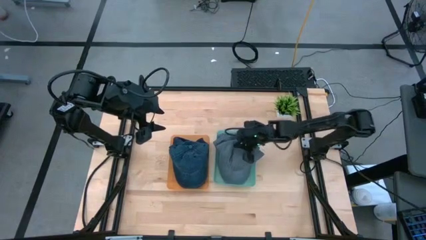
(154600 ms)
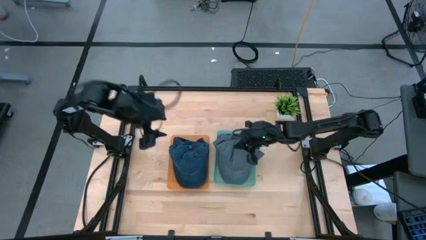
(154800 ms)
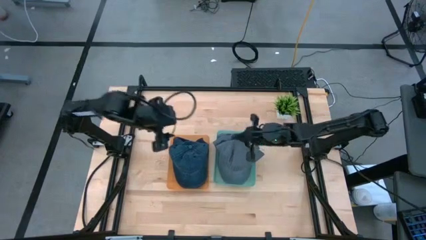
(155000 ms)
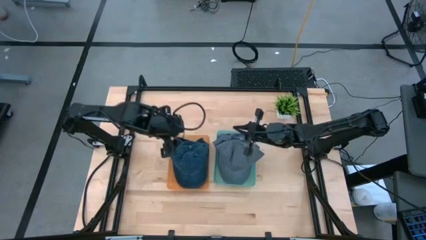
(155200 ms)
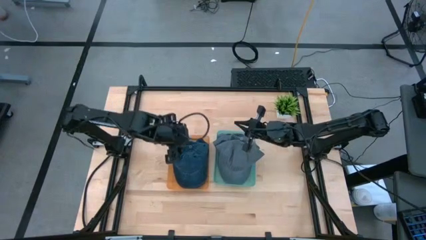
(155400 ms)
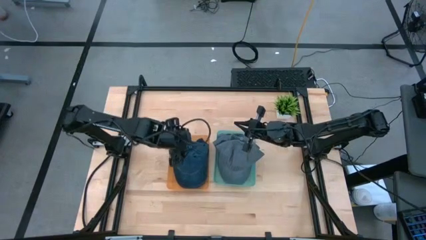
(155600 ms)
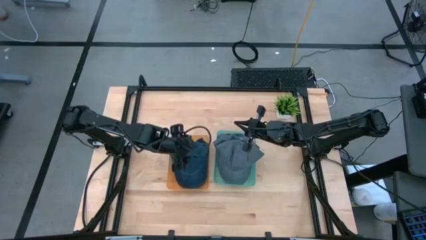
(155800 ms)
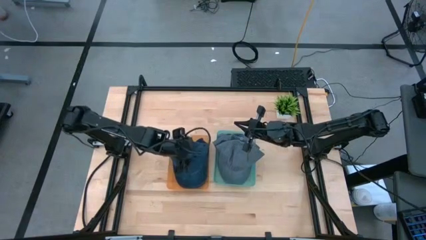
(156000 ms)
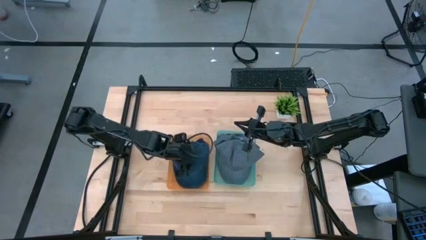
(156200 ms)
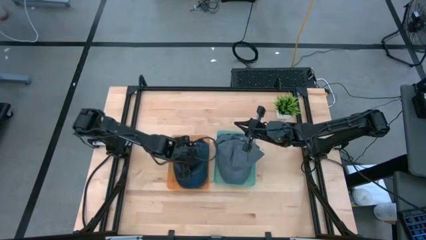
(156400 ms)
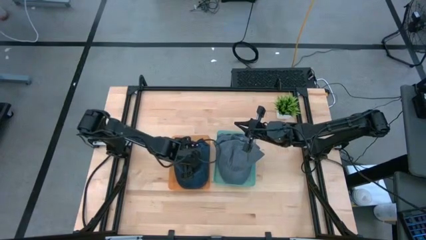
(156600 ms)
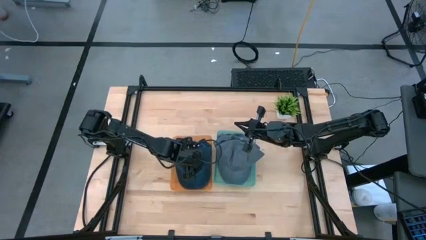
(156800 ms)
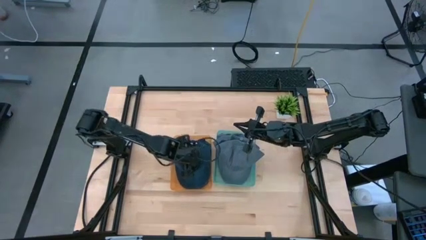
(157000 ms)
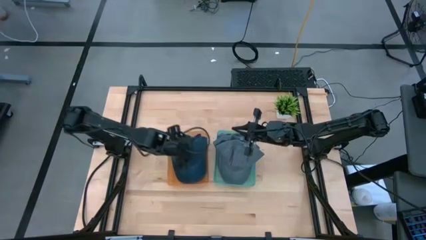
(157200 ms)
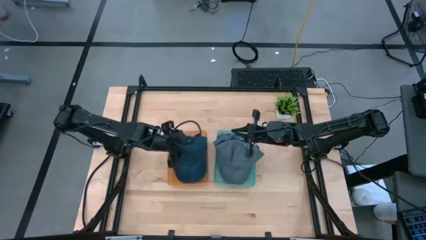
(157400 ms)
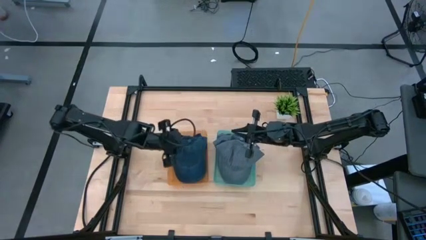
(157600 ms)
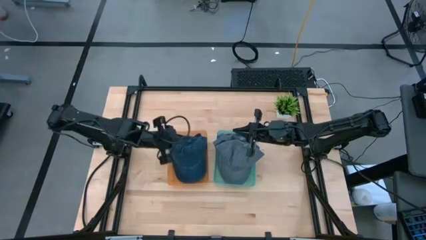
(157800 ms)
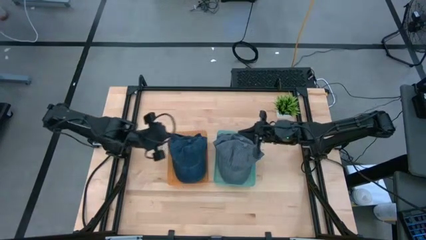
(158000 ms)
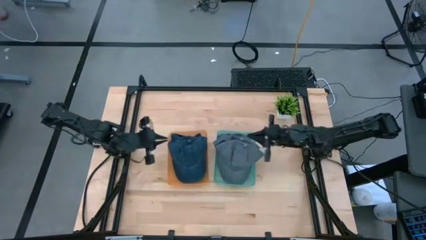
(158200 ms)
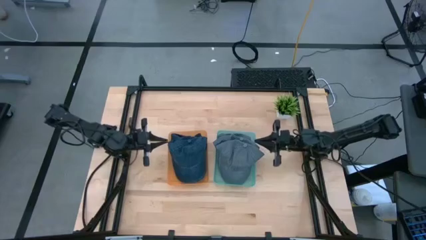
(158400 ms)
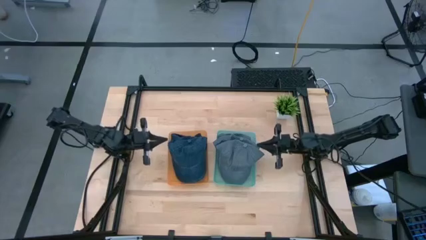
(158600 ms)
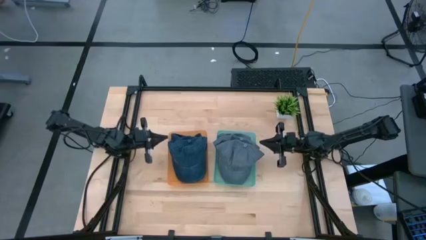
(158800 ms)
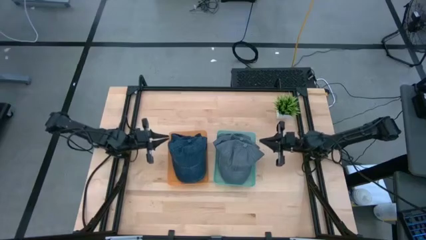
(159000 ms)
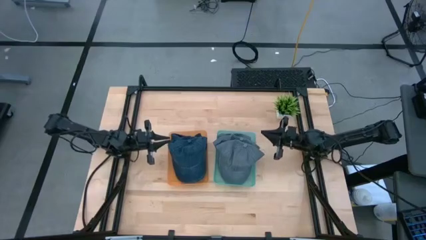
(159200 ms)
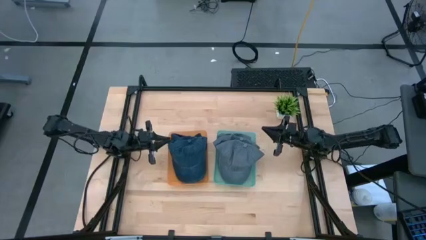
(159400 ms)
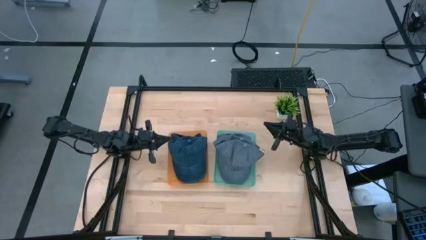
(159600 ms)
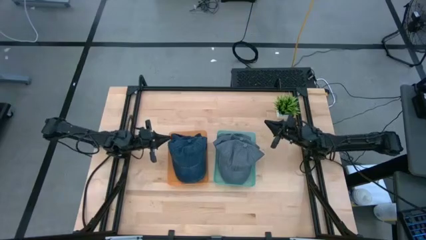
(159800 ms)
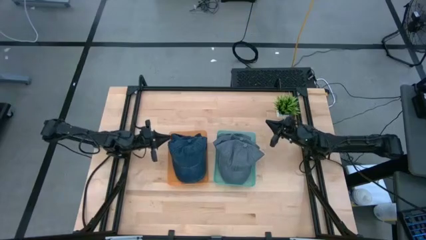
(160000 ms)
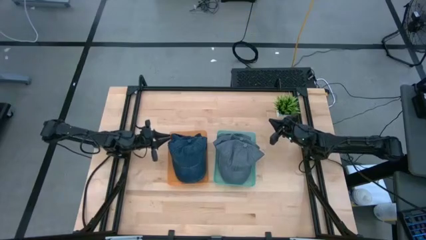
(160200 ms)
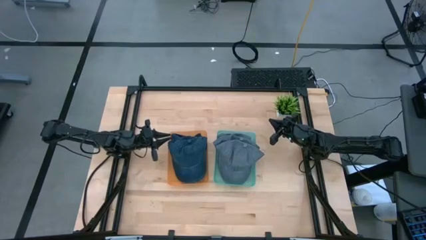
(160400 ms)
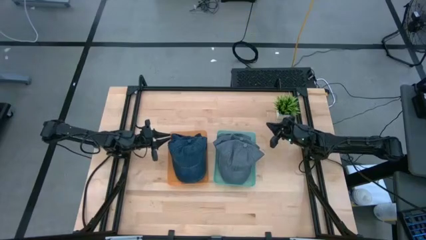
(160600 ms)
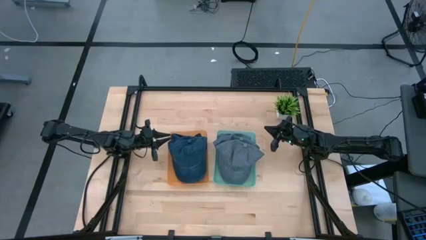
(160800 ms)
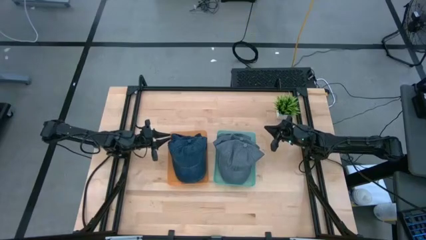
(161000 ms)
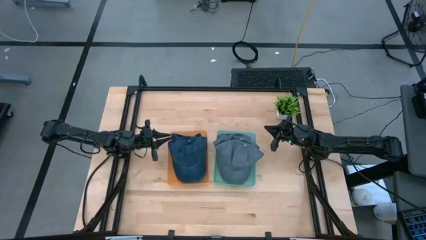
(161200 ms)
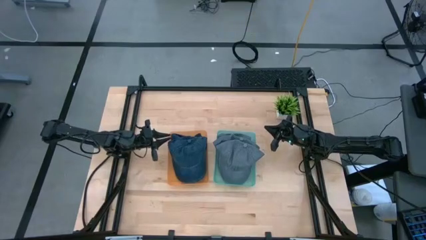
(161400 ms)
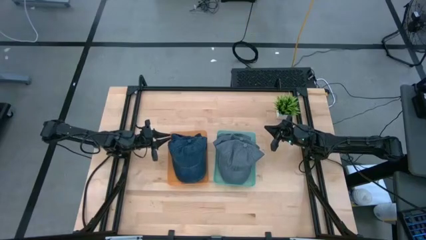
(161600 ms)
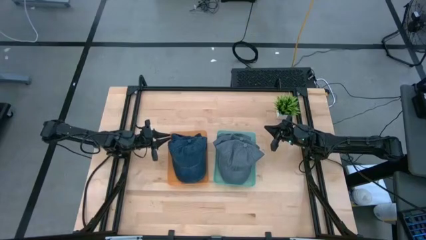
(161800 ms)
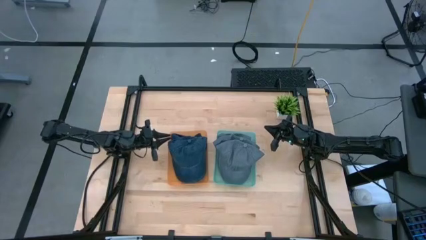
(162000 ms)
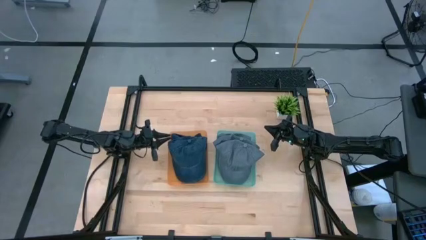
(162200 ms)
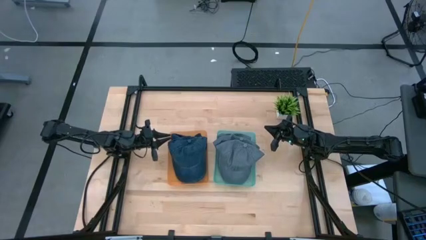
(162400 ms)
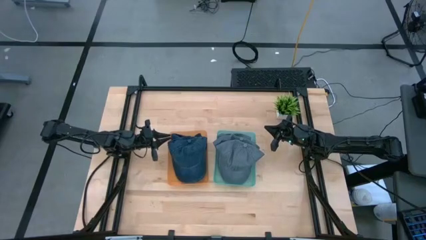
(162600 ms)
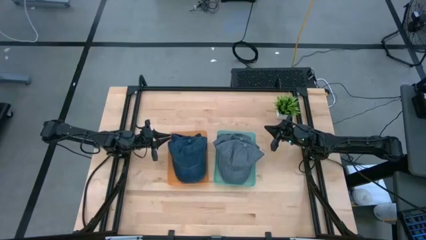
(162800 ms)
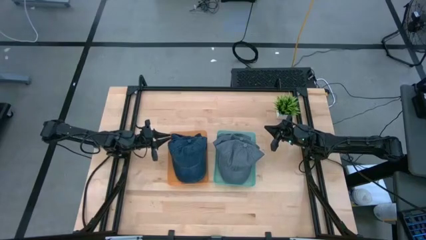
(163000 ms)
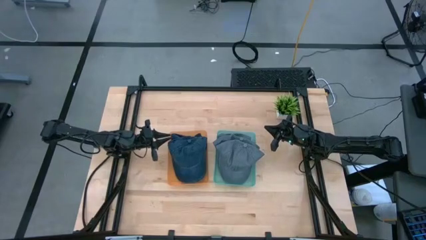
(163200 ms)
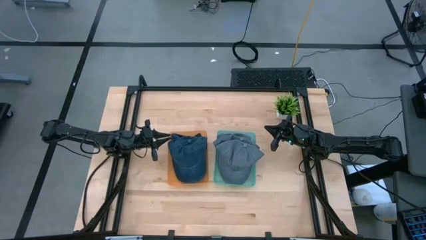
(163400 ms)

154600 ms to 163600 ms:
Task: Pick & Place hat
Return to Home Position

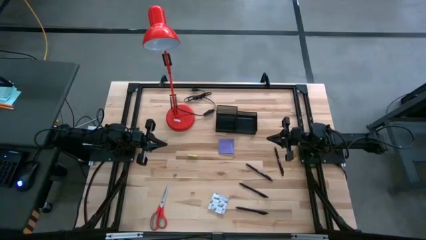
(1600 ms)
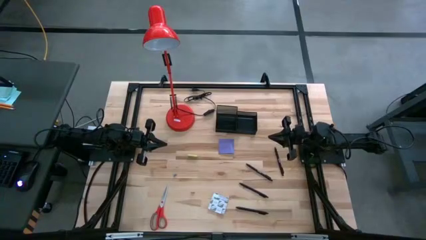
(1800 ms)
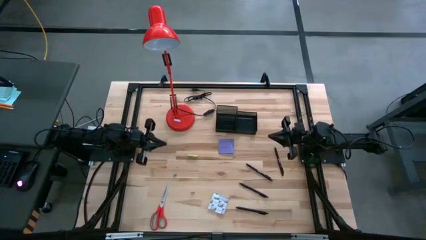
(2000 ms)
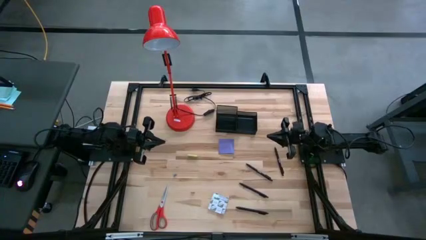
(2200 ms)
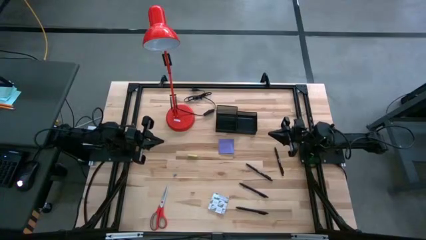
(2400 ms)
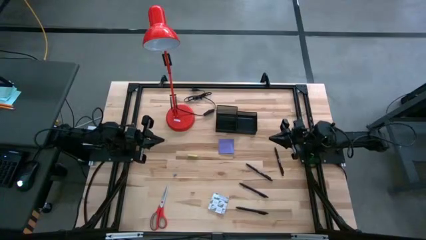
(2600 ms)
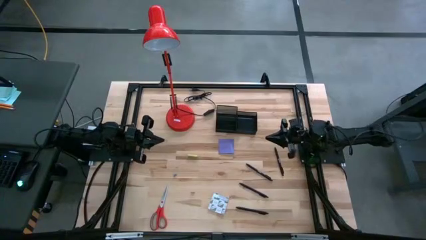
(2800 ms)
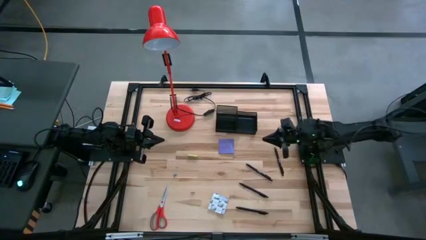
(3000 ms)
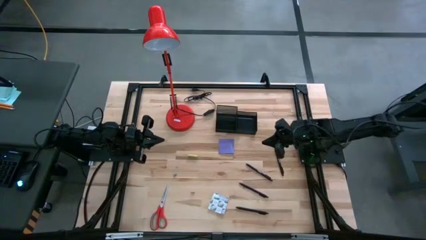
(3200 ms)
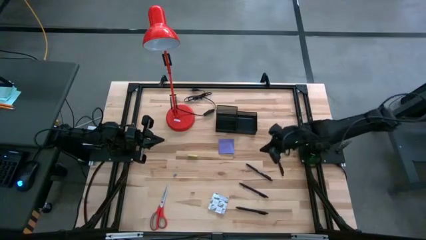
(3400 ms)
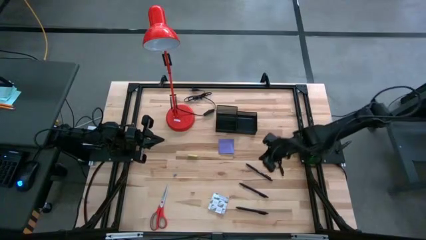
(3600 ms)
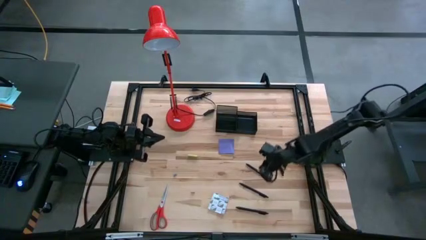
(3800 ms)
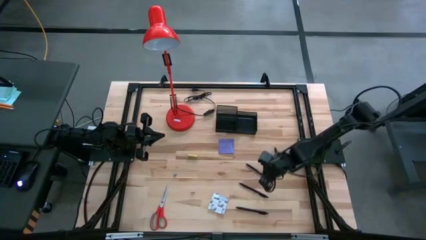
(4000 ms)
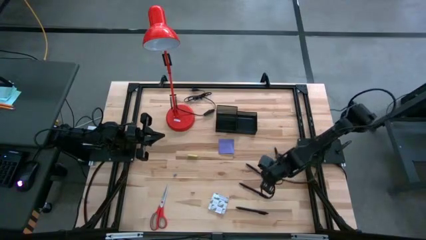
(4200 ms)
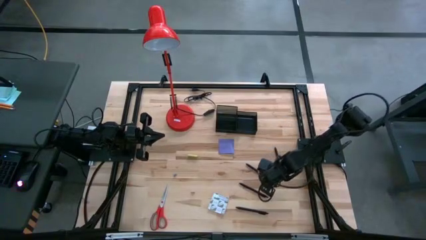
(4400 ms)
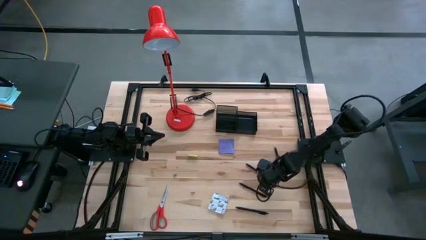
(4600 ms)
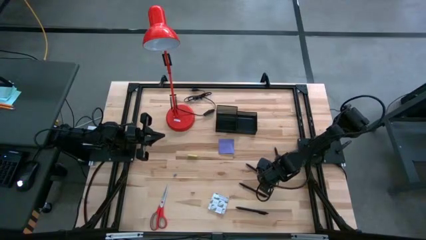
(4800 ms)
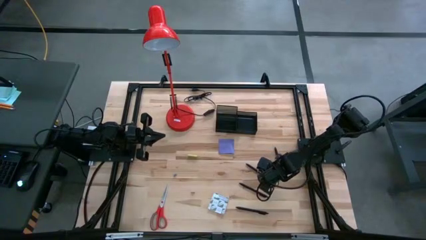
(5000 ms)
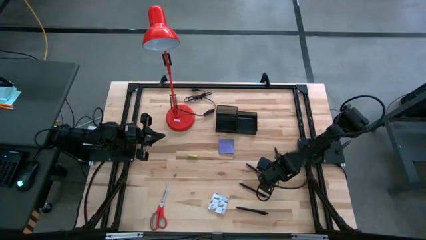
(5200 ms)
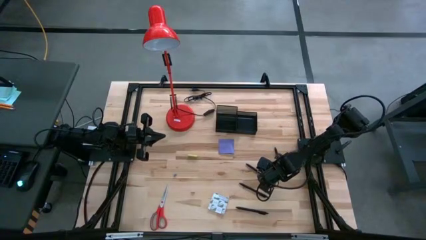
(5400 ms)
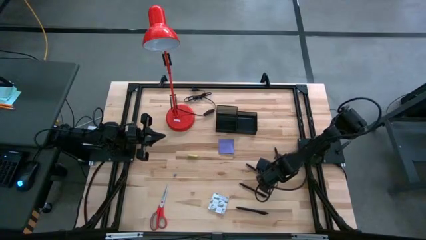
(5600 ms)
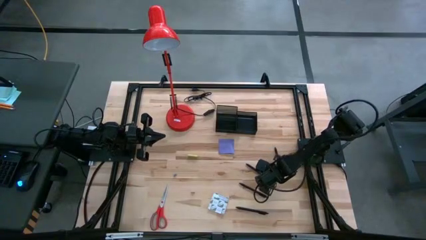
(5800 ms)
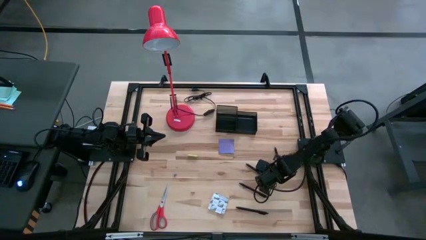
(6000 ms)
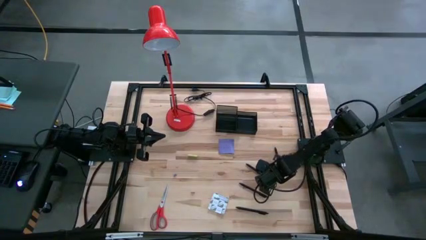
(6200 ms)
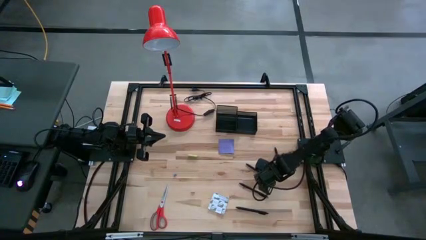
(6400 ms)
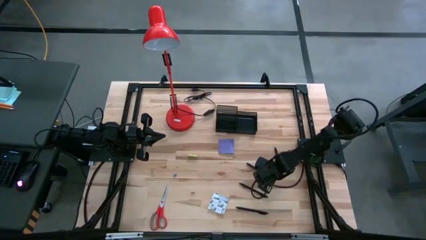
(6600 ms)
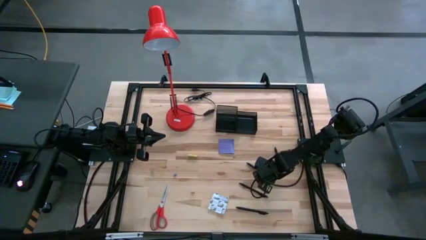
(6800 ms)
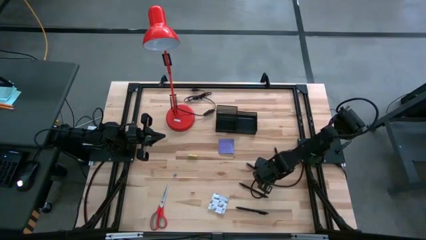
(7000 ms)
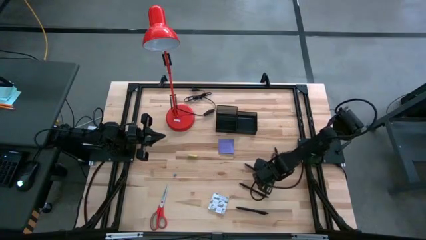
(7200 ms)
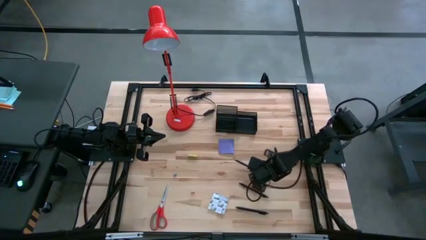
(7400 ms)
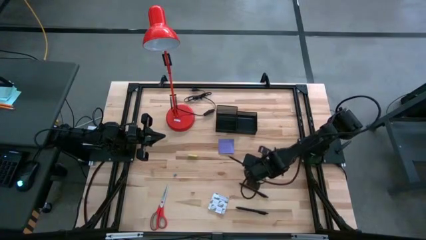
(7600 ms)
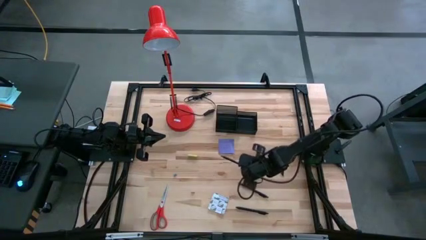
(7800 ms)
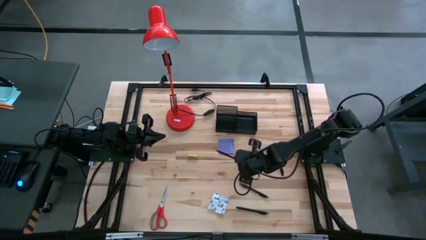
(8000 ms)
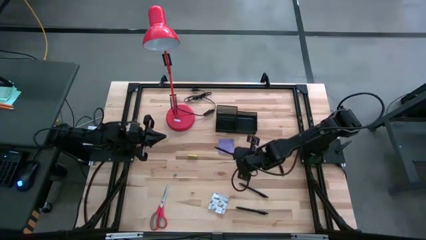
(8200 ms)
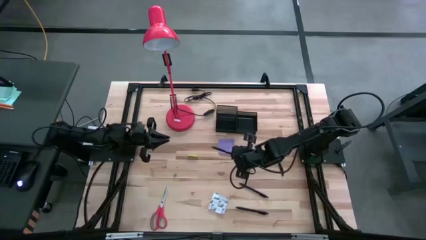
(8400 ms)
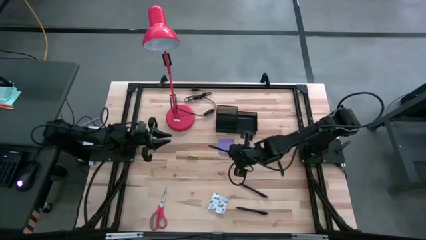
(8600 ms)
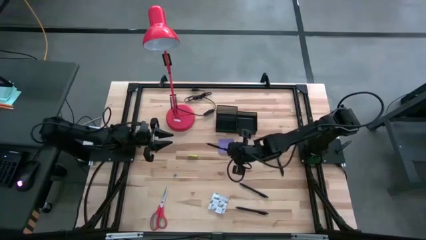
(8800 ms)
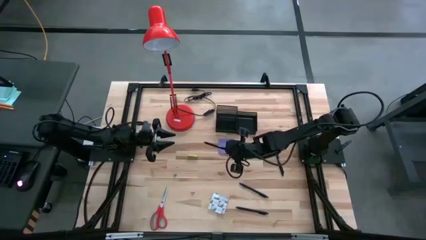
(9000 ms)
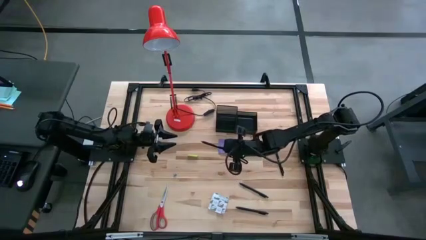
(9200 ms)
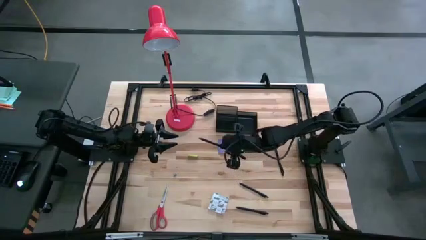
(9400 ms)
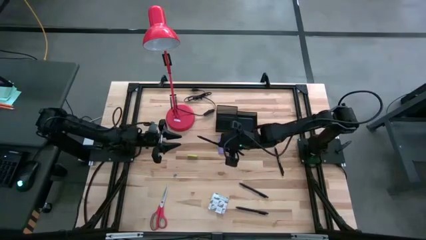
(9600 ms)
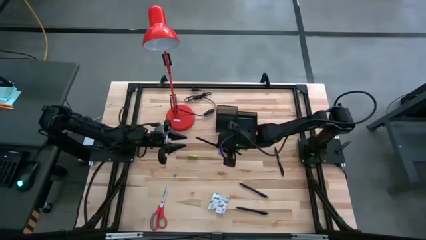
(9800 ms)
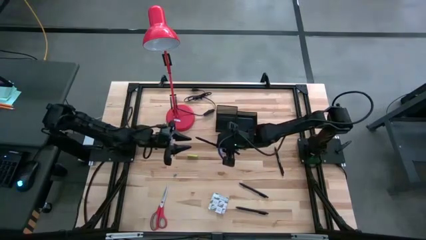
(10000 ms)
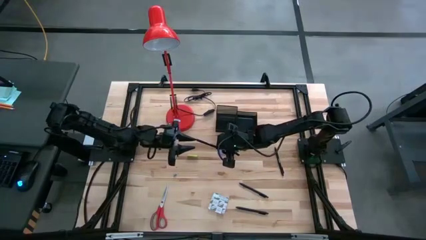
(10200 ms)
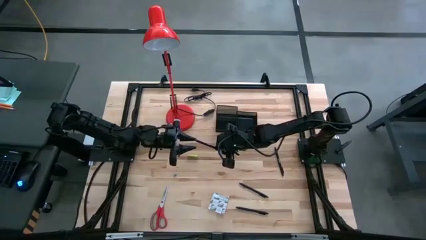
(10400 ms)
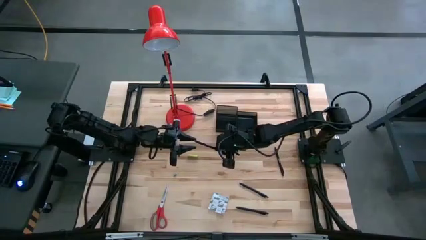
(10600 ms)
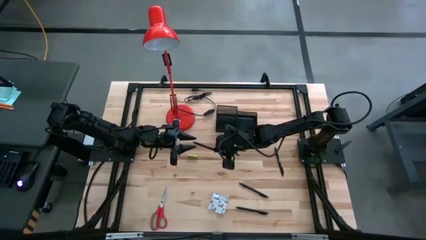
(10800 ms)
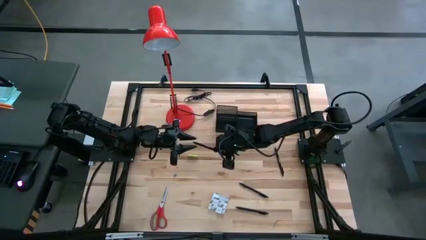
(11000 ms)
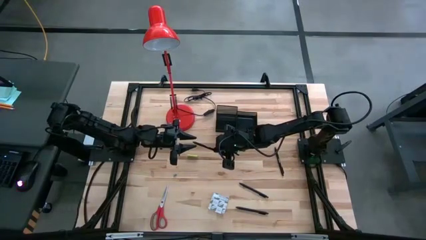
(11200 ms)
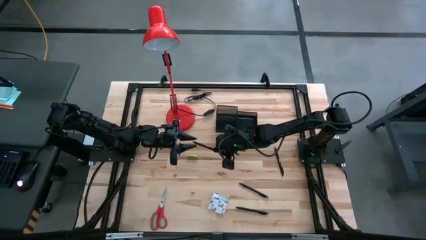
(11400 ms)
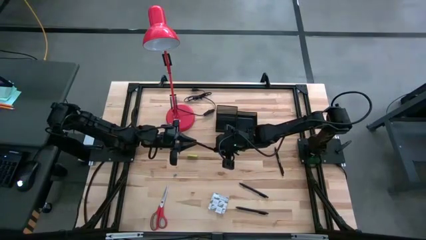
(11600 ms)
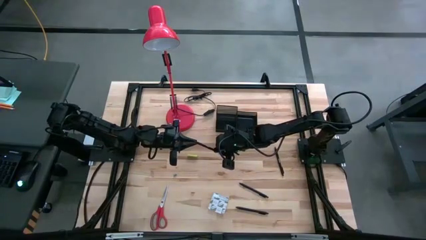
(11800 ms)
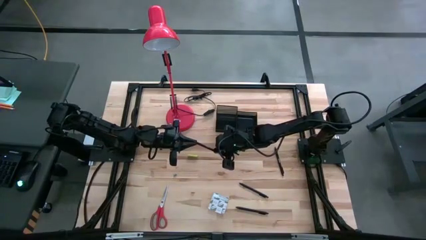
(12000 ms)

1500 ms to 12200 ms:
Task: Pick and place office supplies into organizer
Put the black pen into the black desk organizer
